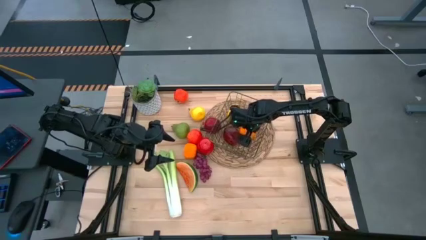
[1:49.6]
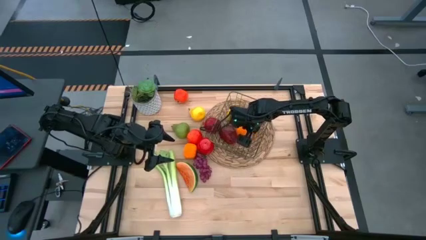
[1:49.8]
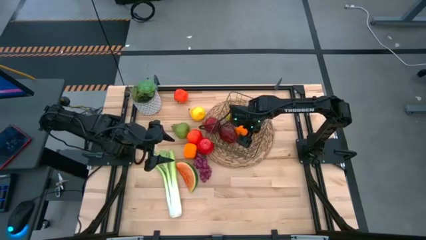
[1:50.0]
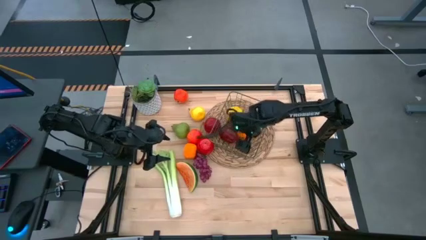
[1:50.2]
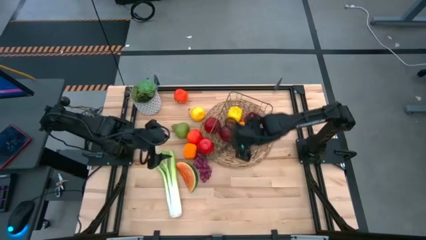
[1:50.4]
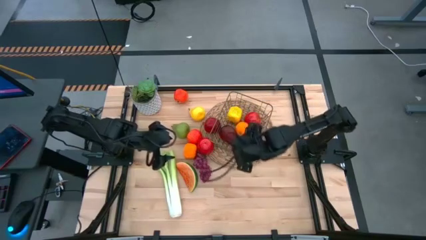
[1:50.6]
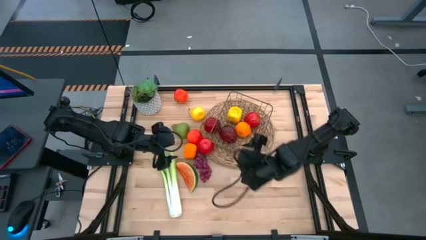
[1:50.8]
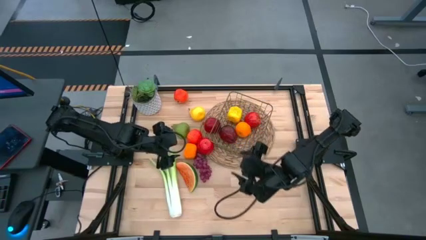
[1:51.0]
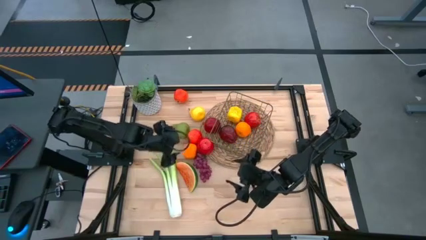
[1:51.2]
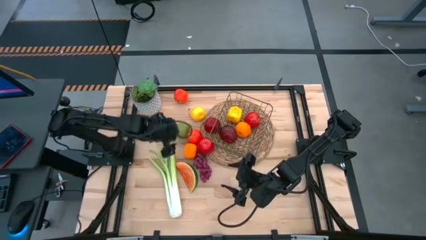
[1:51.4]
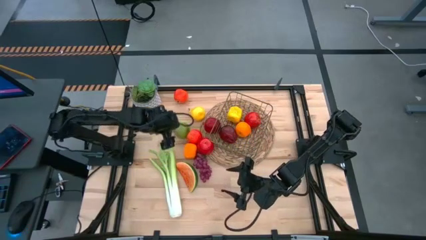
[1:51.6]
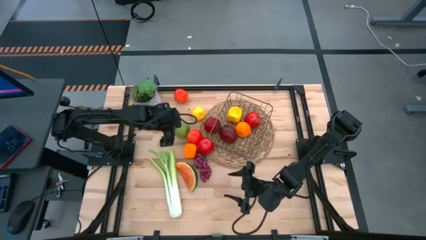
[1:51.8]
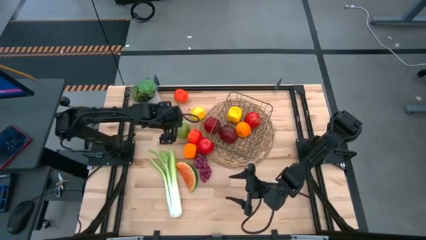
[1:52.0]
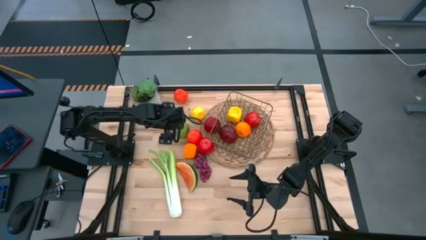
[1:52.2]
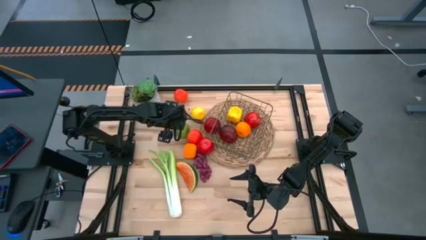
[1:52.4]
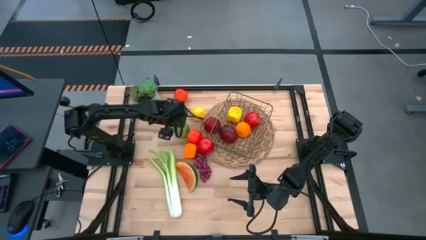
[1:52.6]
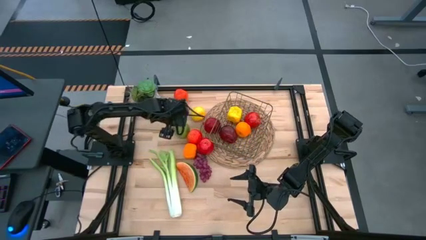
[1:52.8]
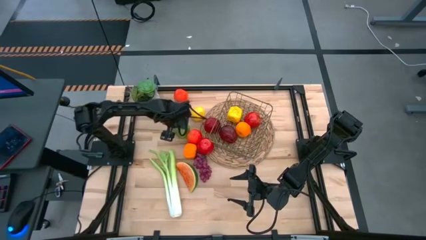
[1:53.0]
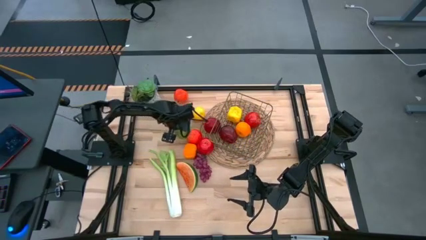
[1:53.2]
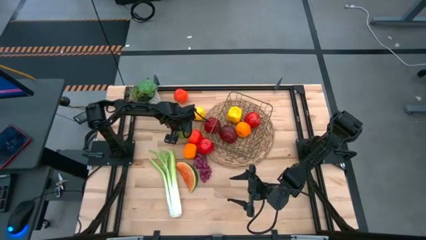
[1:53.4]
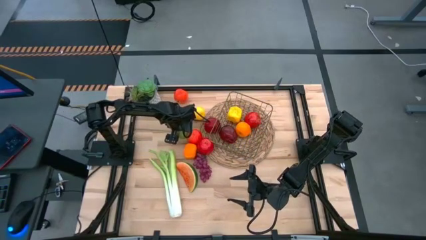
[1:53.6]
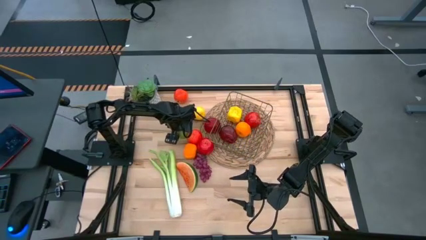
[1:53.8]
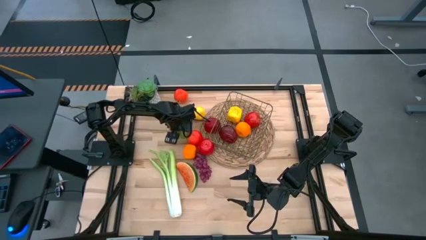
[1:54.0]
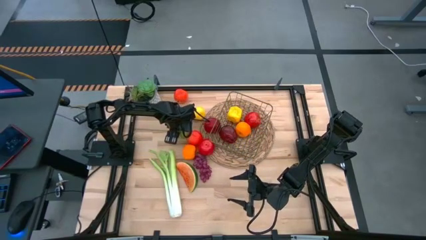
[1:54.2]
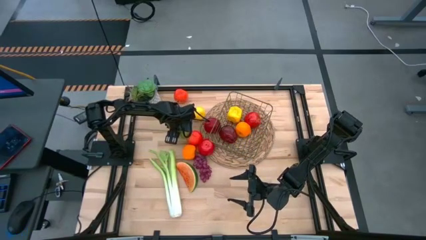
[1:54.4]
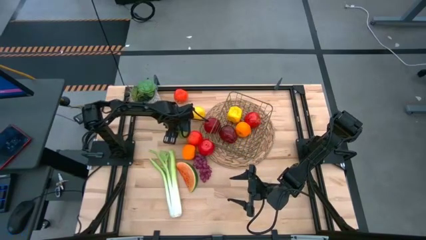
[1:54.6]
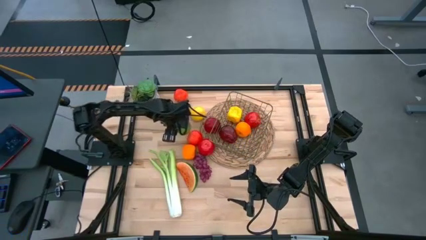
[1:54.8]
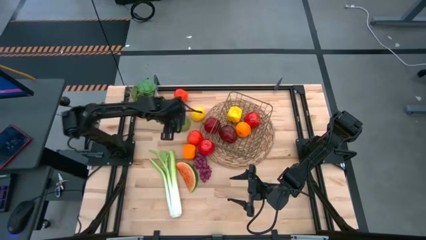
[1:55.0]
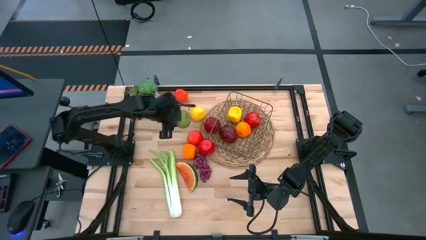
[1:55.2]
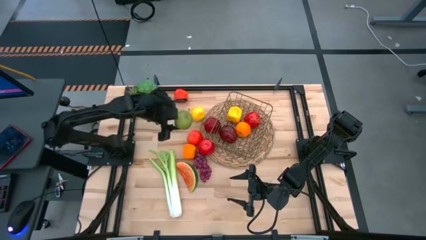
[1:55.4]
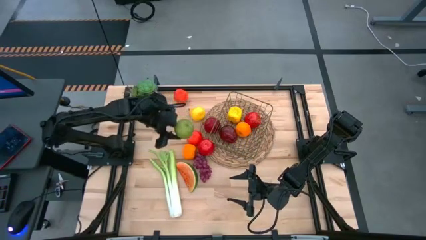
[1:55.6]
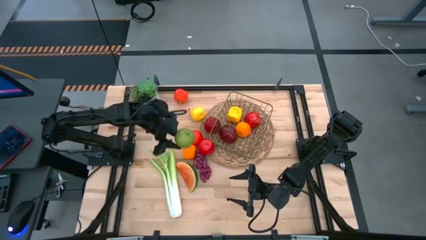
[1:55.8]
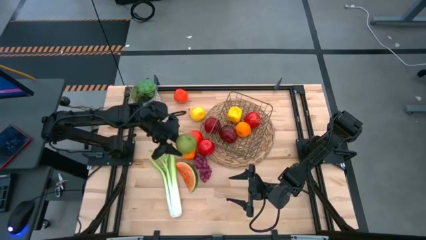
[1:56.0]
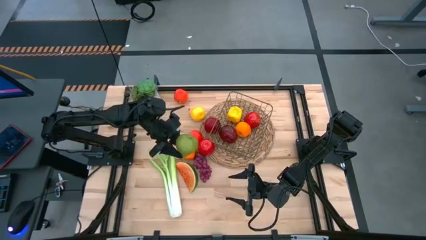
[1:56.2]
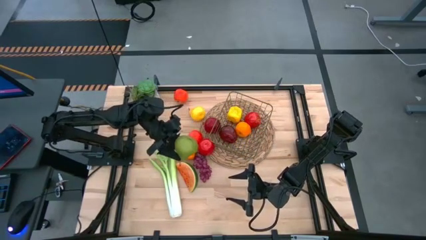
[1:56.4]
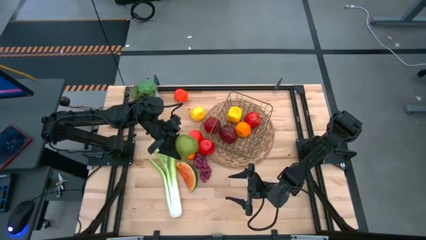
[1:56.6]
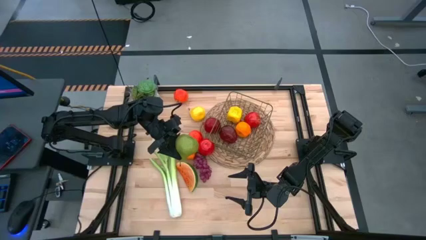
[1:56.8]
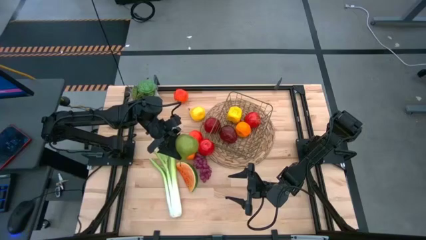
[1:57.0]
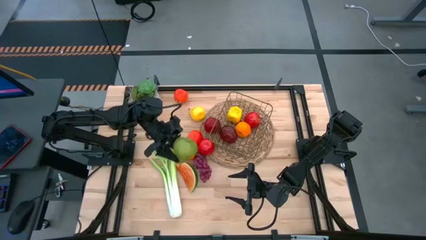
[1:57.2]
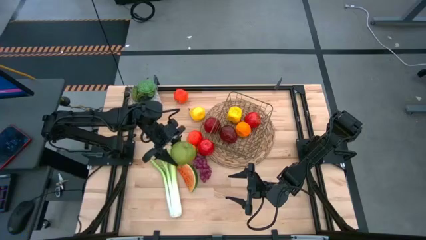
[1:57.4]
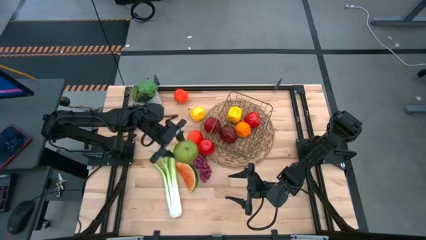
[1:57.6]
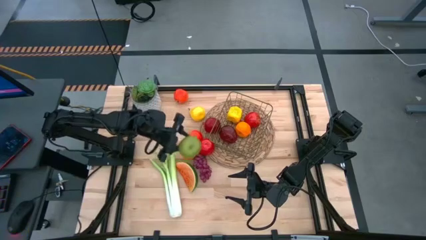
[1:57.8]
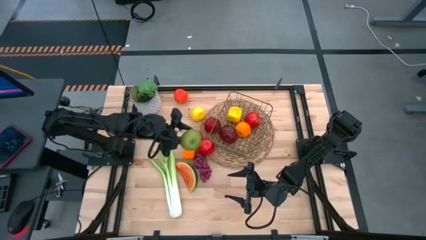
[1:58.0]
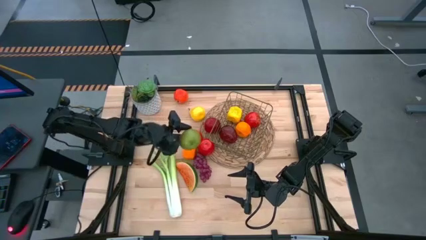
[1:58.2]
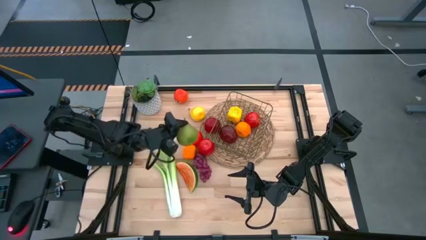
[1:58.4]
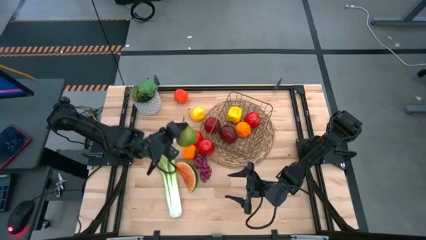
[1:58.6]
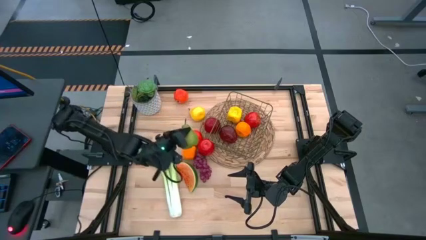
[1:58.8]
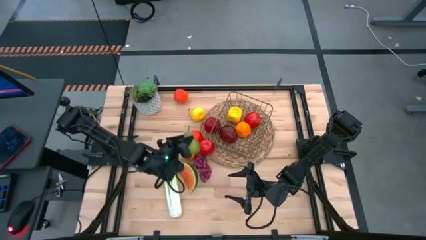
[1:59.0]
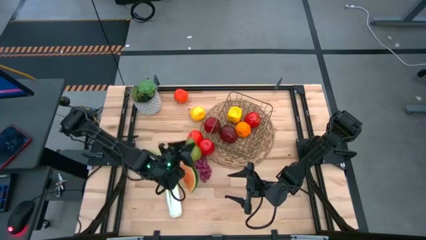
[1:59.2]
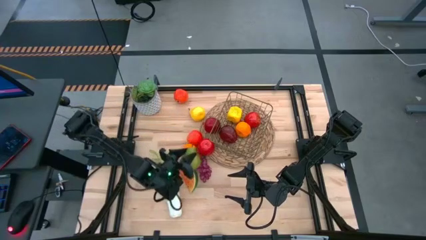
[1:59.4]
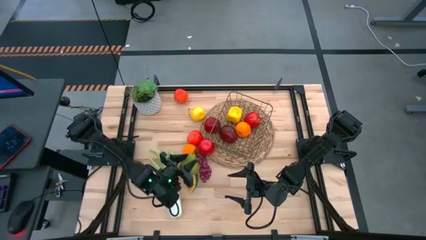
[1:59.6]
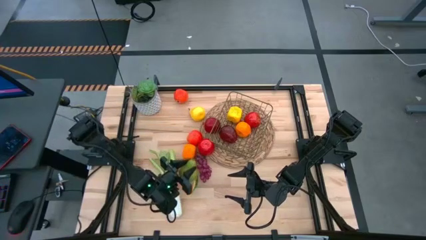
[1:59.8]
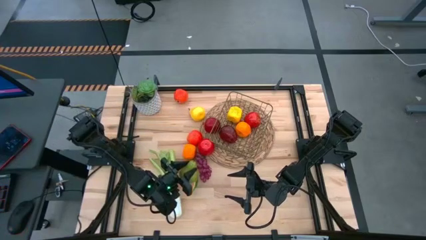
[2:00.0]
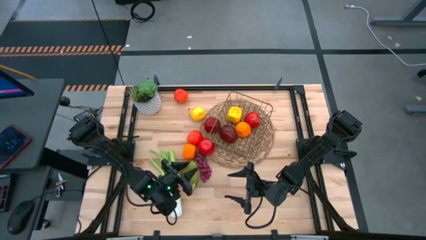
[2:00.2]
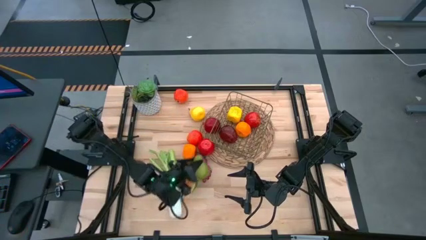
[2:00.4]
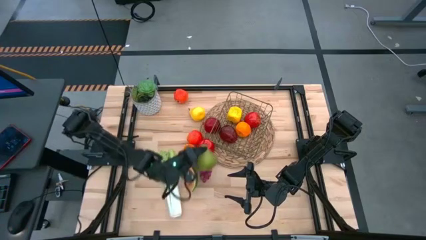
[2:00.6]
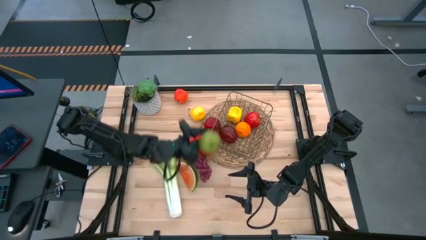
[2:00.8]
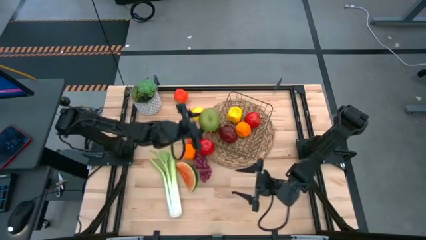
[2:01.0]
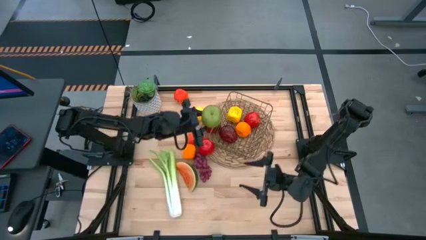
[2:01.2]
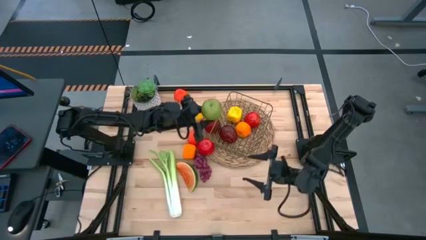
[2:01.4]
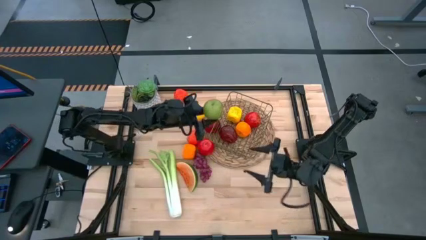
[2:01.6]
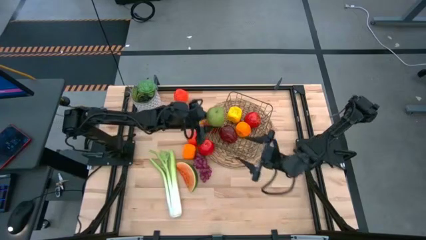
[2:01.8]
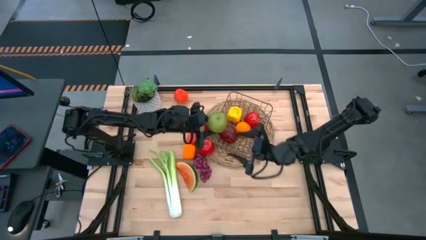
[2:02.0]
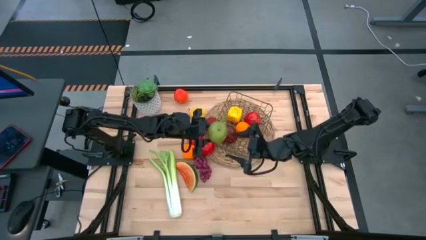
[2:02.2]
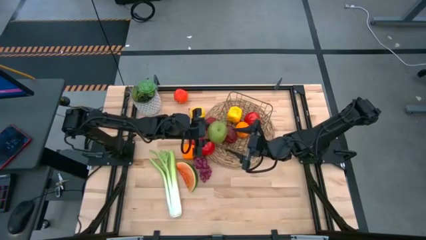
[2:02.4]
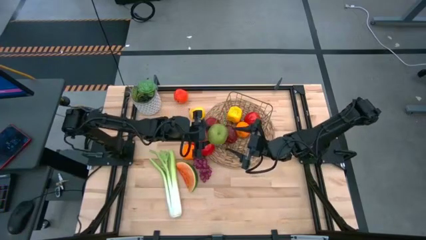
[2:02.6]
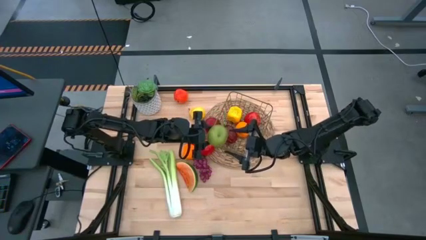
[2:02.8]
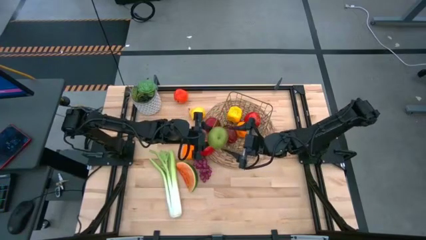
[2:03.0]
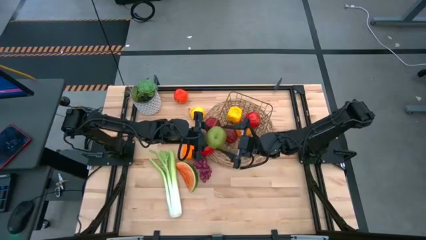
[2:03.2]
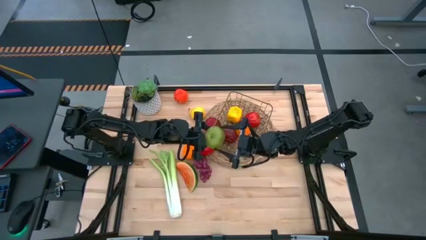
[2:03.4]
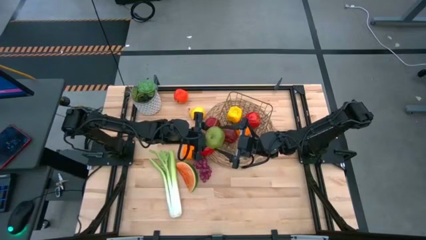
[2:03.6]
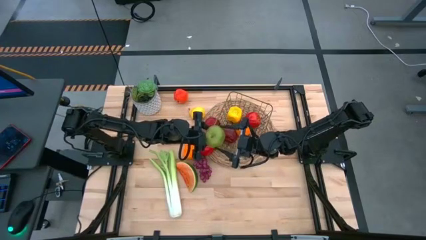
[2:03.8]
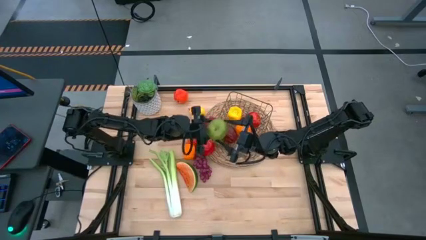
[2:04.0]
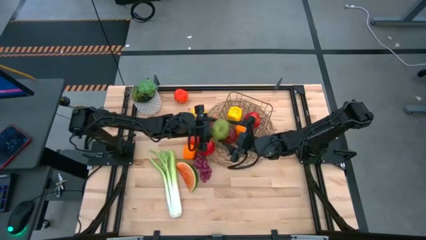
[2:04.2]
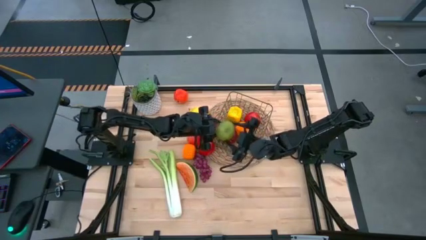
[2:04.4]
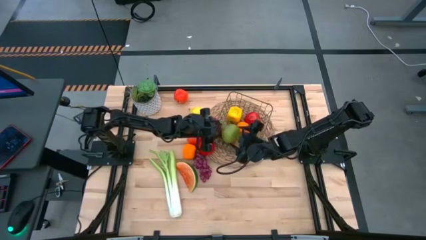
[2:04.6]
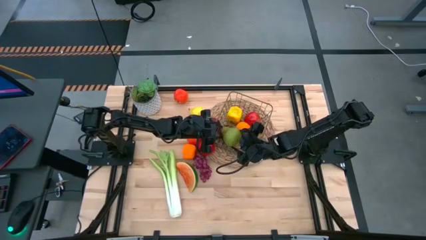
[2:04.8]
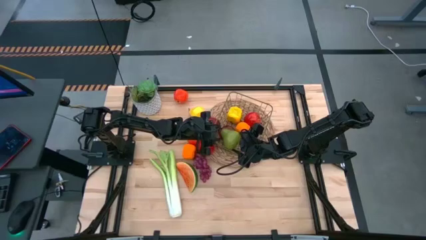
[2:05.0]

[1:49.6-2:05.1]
Task: Build produce basket
Put the green pear into the gold wire basket

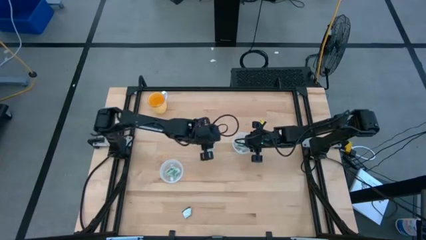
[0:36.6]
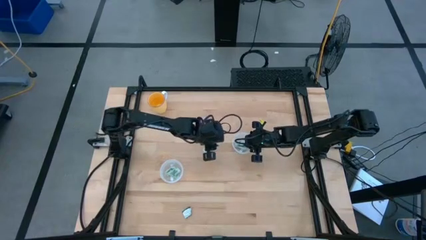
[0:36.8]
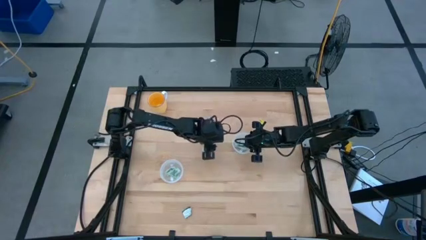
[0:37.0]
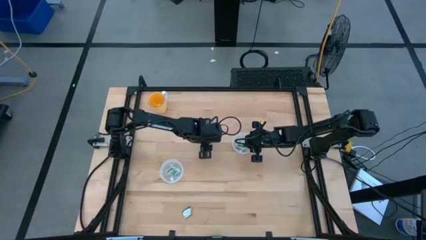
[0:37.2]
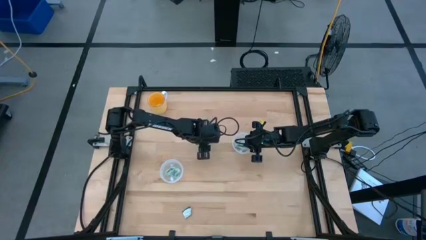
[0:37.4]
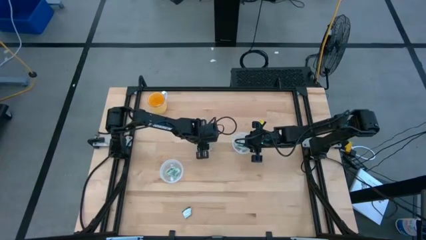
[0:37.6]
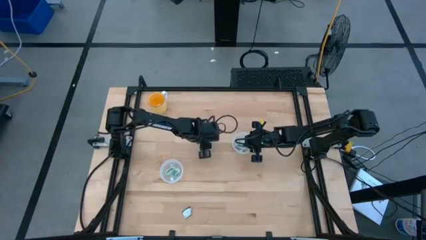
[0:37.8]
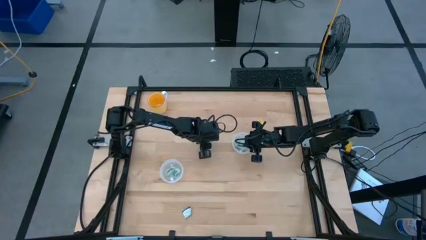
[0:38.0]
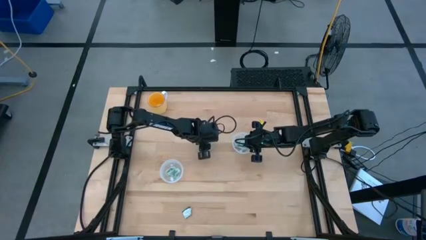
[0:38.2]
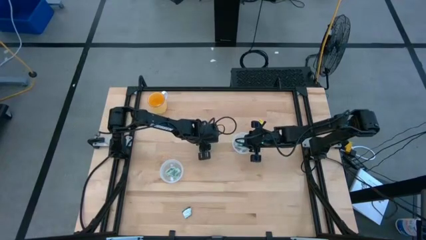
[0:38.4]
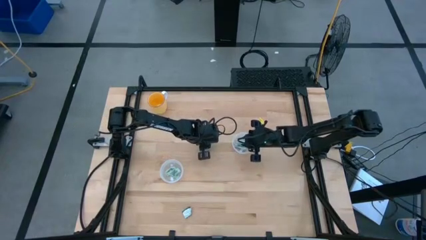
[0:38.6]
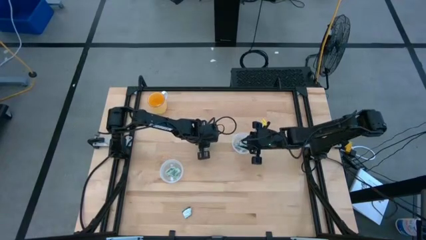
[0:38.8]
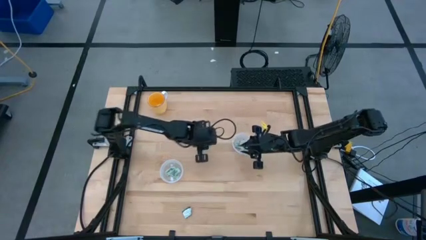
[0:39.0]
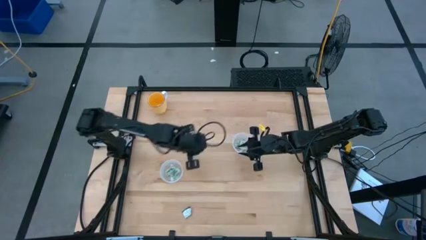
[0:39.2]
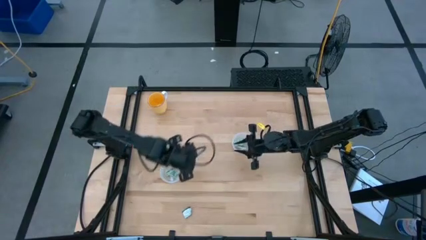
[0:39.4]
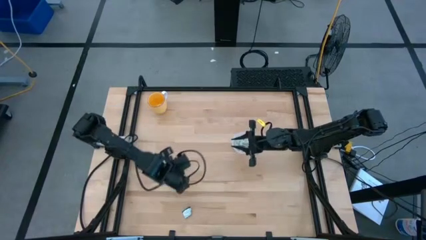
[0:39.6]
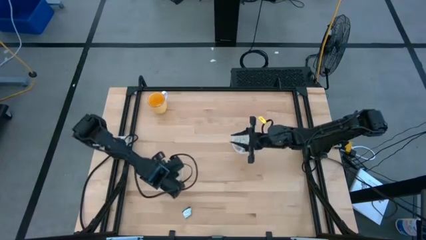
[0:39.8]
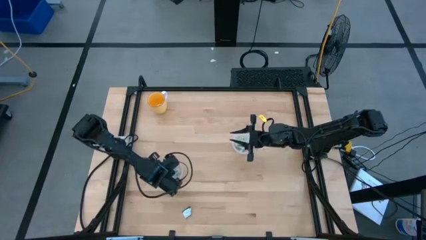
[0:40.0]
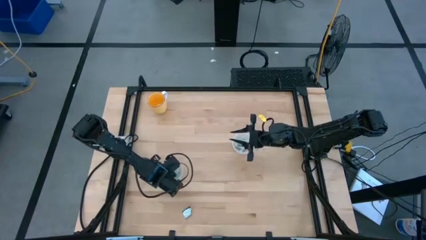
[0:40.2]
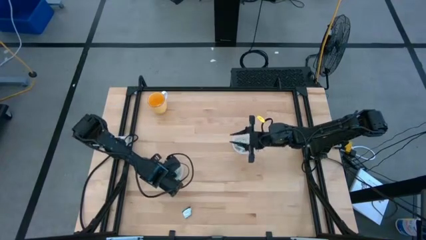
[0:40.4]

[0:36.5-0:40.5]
Task: Pick and place Stevia / Truvia into bins
Put the white stevia packet into the bottom transparent container
